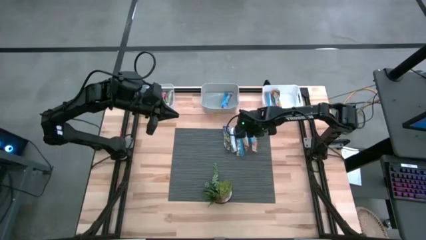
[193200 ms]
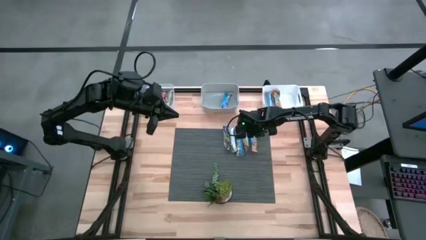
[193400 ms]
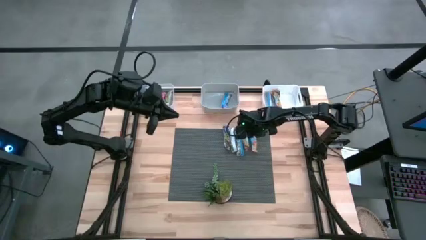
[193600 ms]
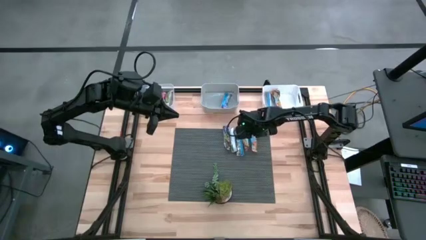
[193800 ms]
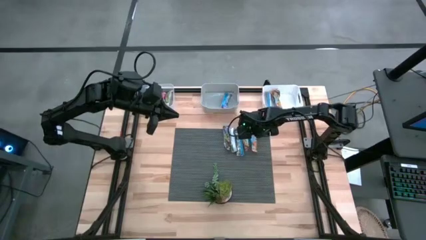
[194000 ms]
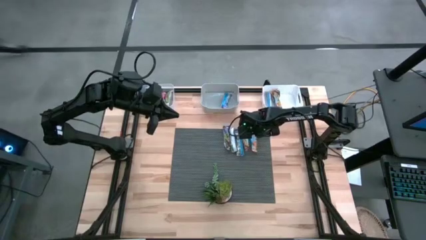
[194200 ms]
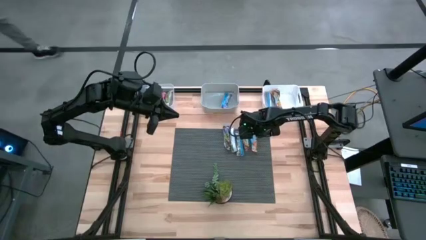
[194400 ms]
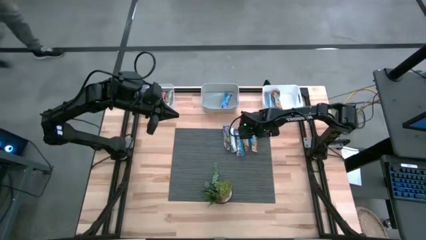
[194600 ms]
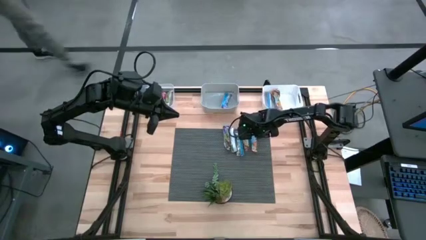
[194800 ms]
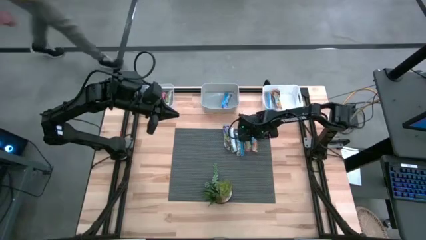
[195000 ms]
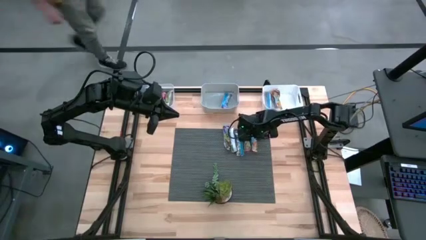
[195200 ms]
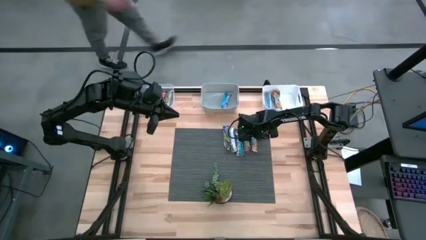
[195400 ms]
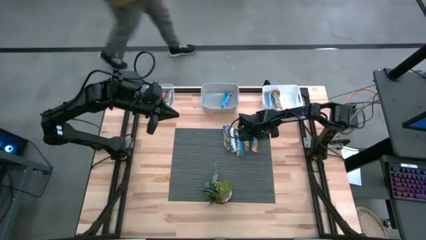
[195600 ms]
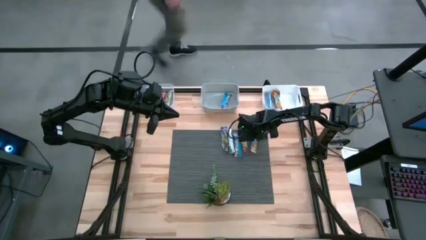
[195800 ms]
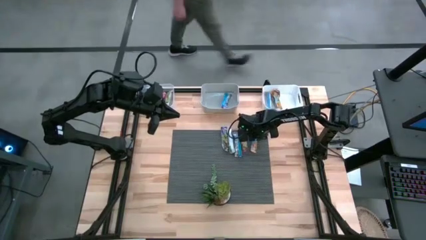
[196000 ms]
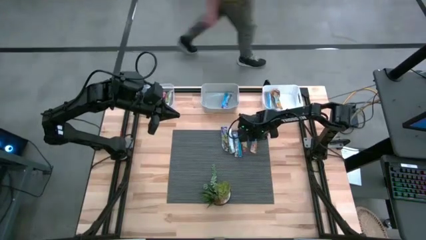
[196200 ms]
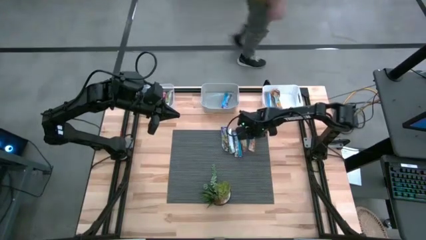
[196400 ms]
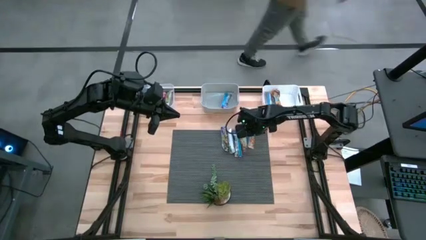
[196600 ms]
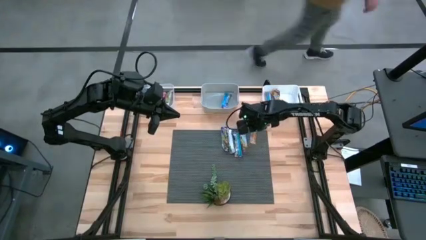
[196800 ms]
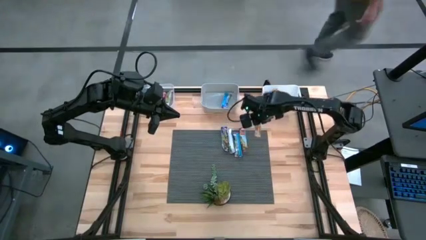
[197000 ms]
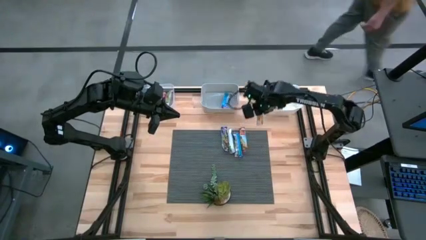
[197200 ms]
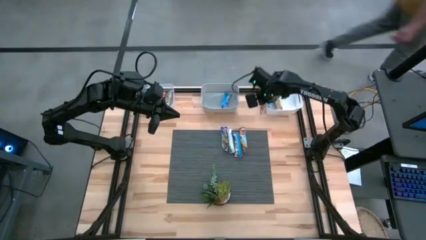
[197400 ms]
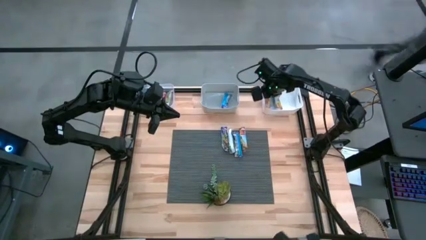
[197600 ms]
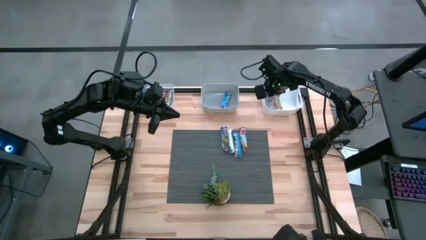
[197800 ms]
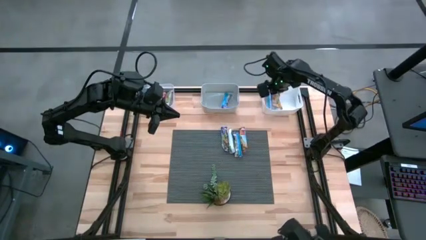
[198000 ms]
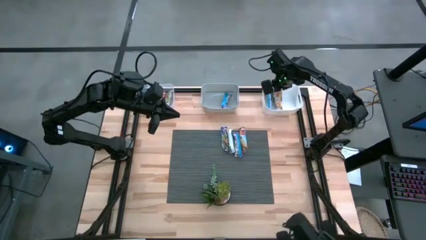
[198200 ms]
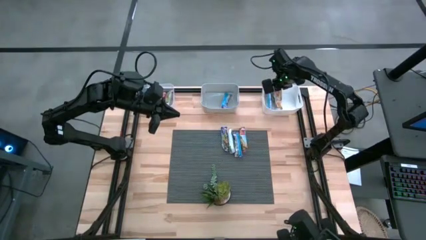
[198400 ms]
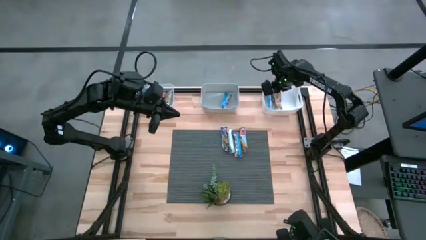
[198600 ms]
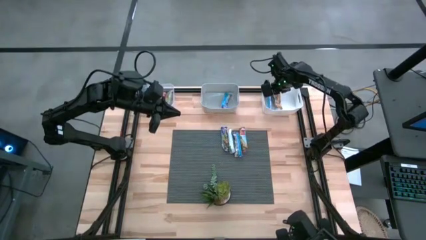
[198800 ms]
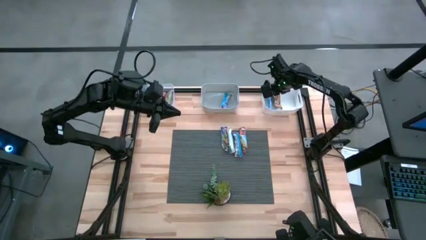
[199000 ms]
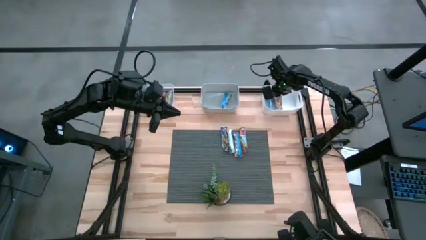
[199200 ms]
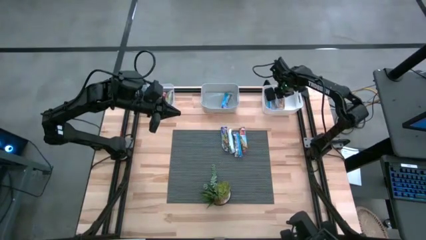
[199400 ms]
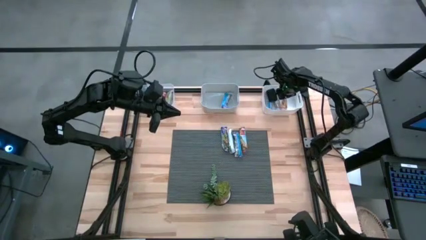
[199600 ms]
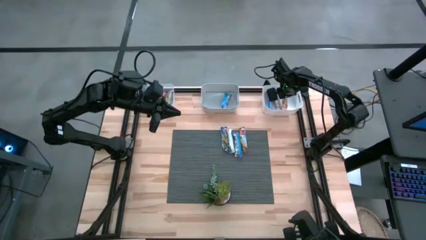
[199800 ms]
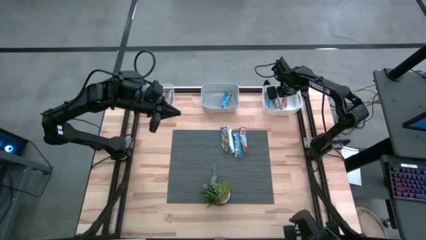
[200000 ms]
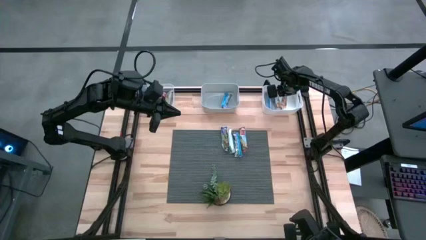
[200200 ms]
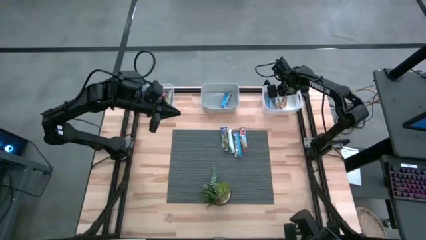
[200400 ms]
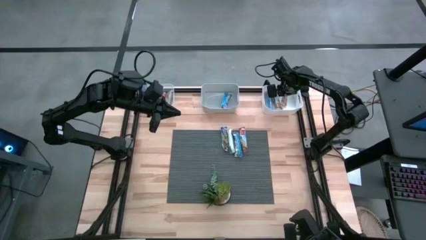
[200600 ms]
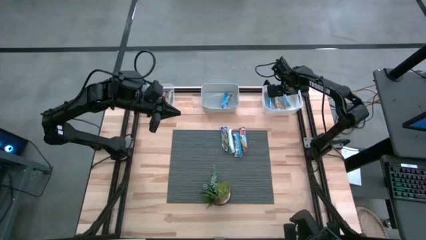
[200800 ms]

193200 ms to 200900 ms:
Task: Pick and place Granola Bars by type
Put the yellow granola bar into the white bin

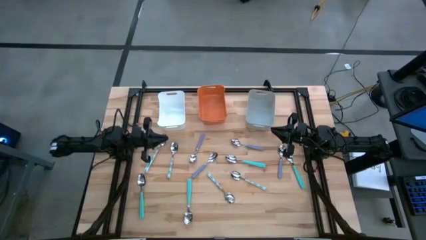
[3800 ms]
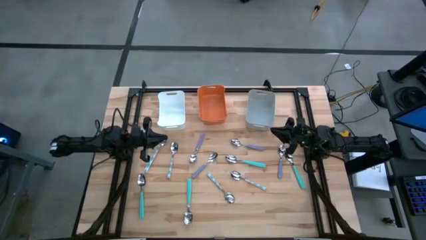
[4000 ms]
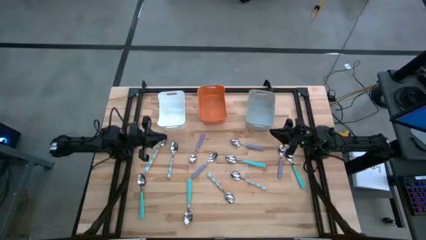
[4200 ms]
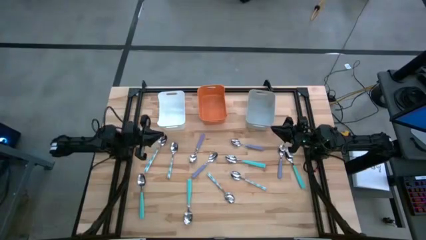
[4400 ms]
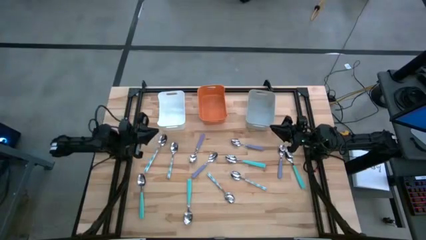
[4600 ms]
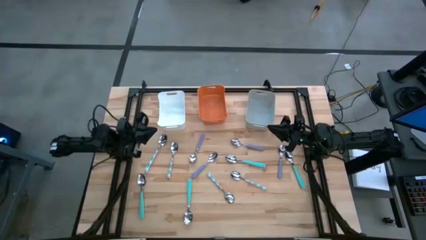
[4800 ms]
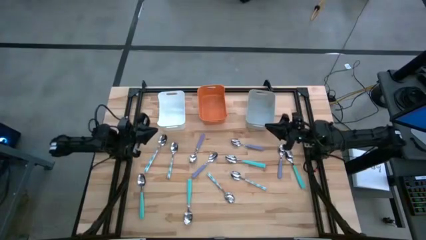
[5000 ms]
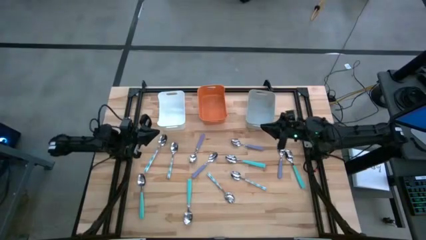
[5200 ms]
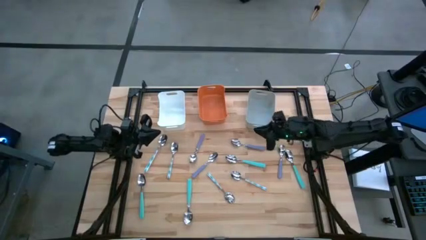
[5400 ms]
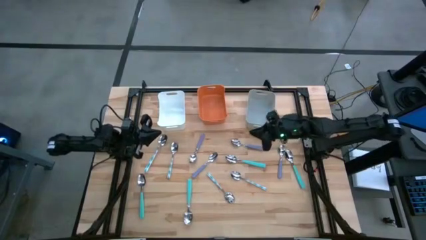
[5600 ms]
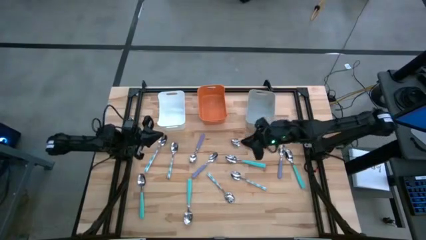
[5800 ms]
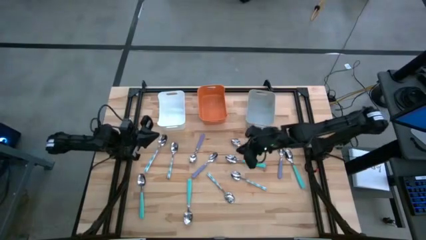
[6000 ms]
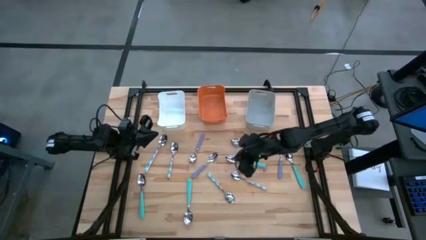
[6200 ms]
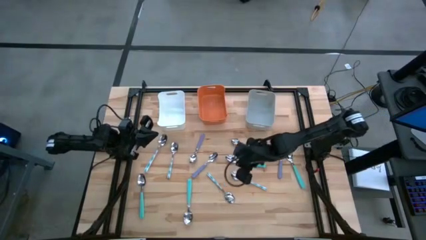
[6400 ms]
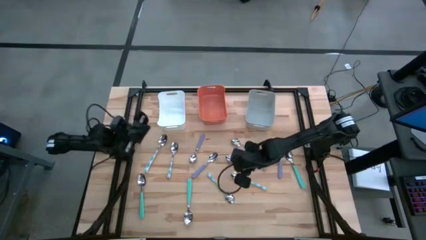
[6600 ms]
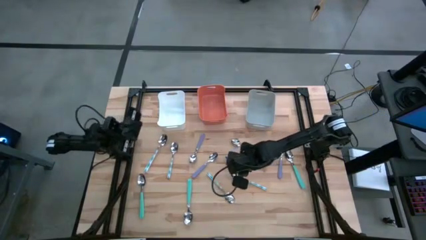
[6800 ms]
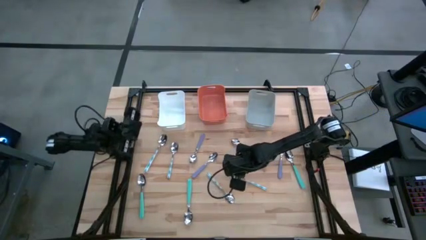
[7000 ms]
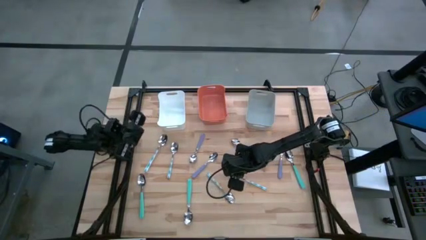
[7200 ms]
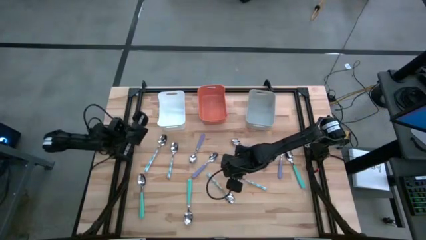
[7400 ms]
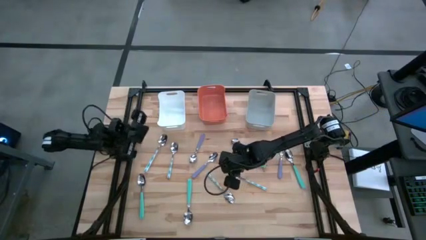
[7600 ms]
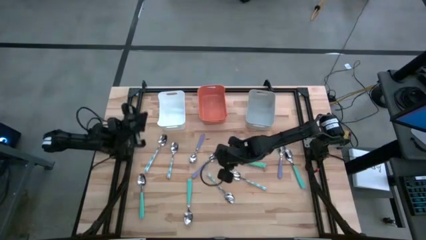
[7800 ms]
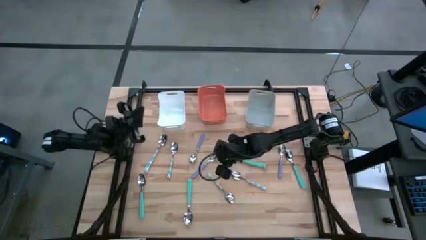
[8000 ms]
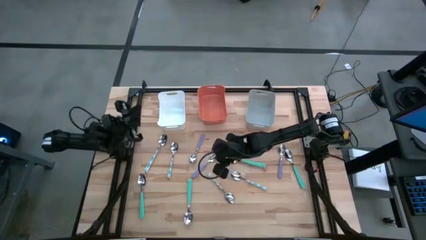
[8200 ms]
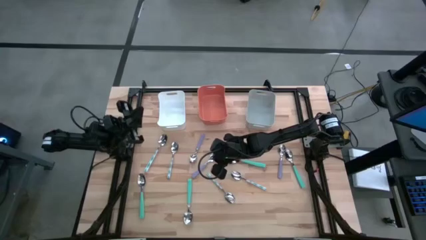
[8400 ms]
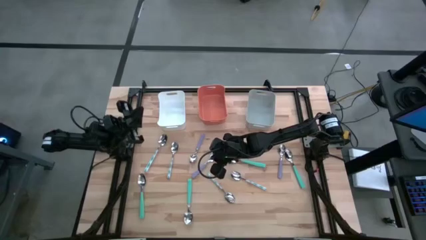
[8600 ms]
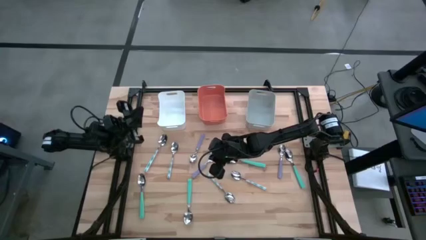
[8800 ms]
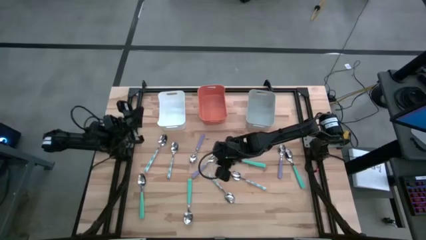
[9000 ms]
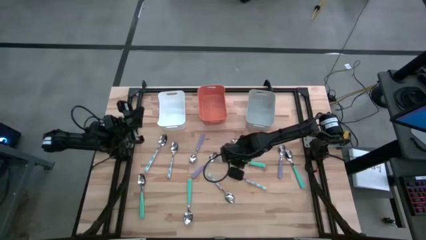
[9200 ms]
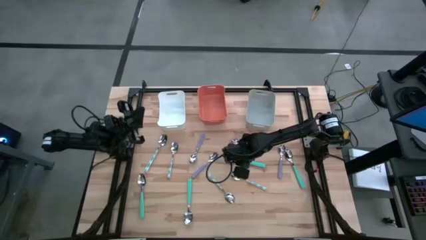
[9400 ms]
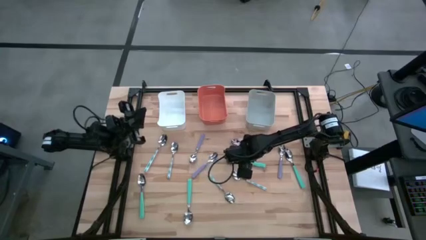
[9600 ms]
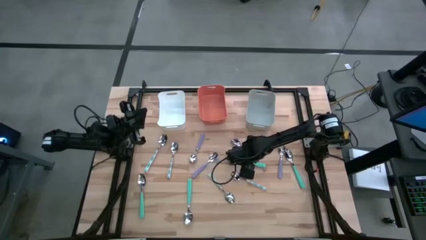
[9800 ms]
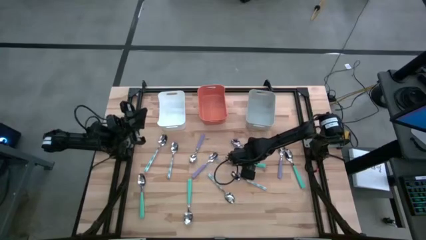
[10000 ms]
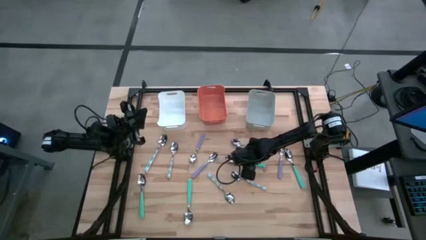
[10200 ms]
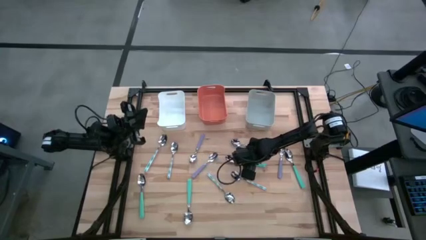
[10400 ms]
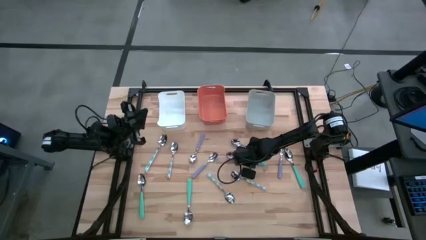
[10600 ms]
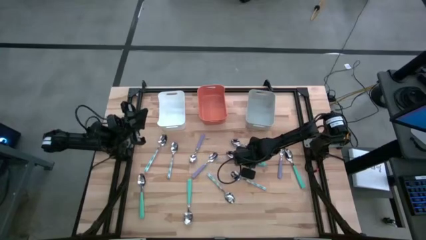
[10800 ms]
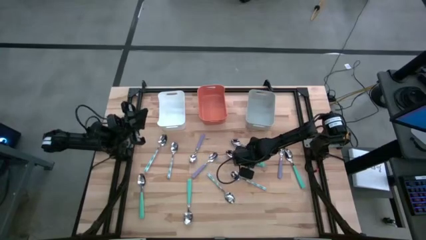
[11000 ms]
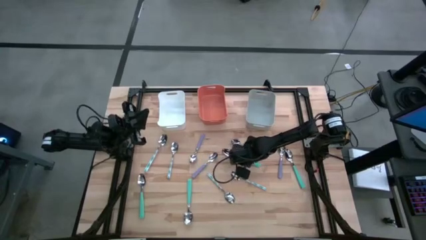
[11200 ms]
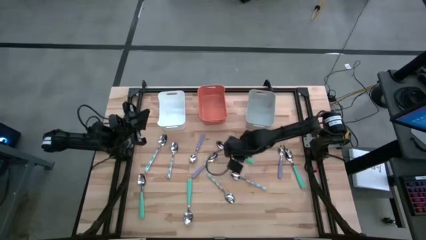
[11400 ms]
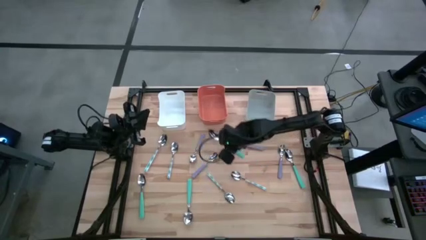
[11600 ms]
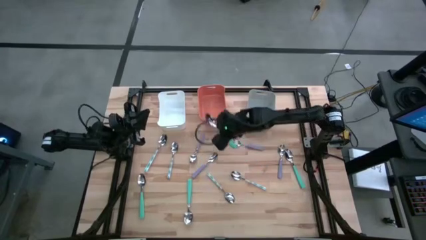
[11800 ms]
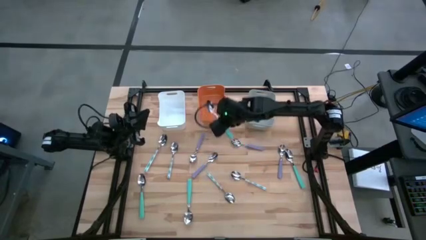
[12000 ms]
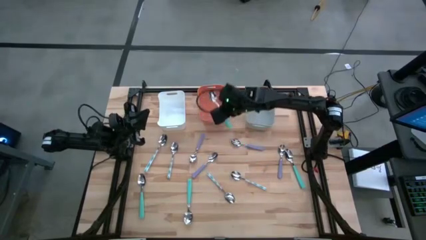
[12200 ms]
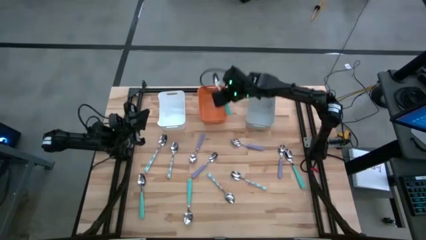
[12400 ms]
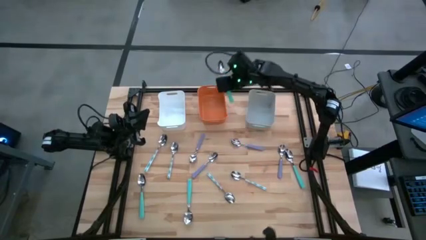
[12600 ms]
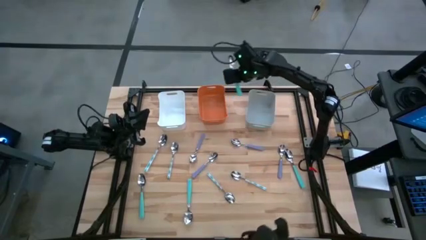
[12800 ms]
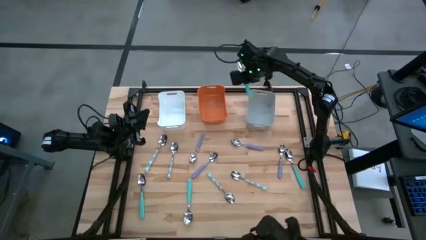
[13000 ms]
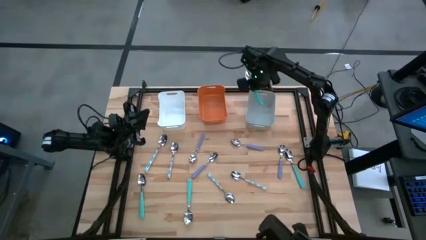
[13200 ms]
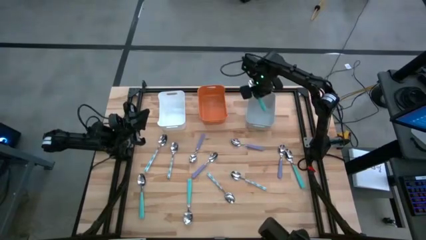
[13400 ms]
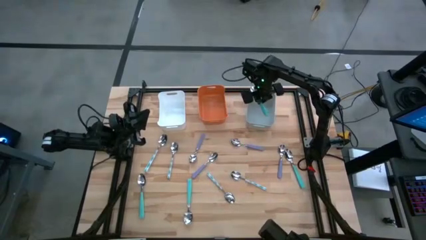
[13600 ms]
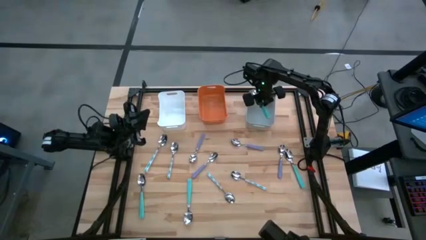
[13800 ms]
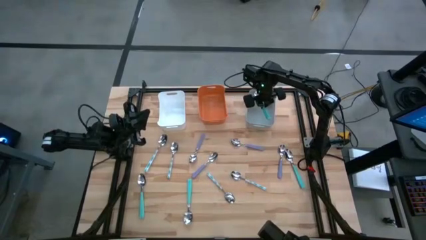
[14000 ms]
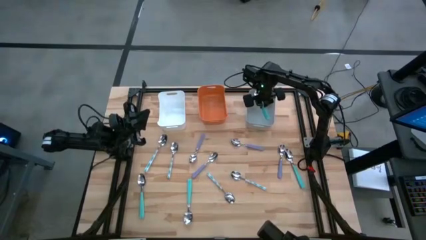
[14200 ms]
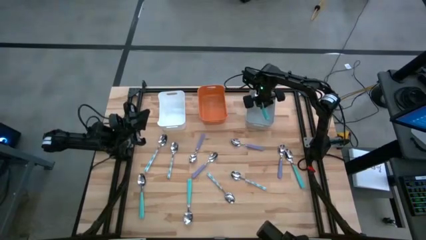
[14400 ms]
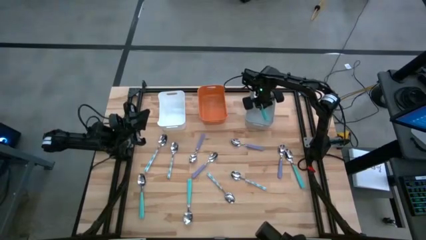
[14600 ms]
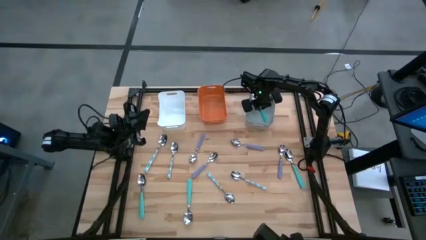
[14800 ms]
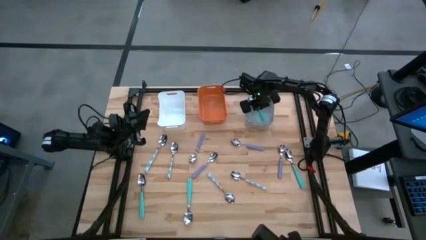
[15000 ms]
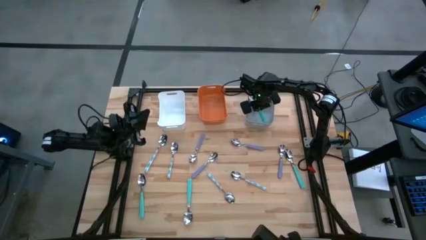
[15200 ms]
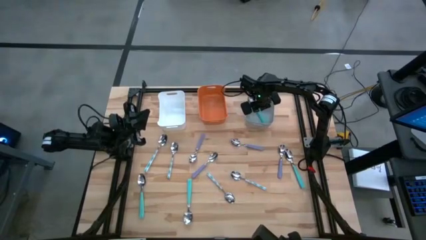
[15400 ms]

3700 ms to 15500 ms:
Task: Sort silverware by color (type)
Put the green spoon into the gray bin
